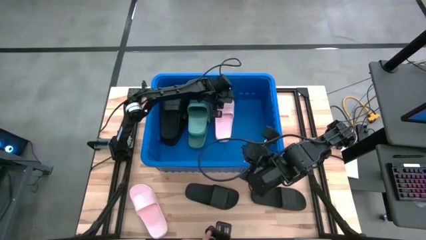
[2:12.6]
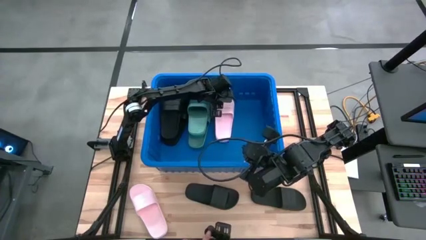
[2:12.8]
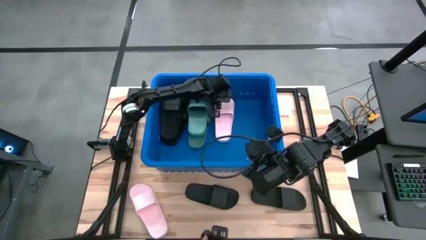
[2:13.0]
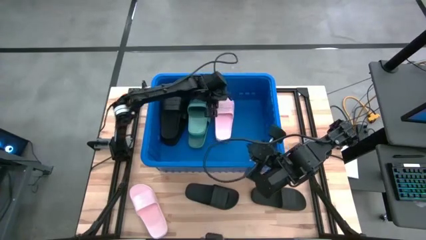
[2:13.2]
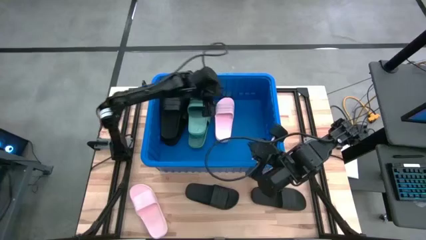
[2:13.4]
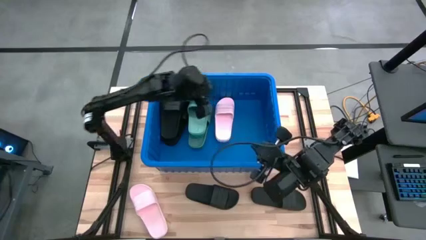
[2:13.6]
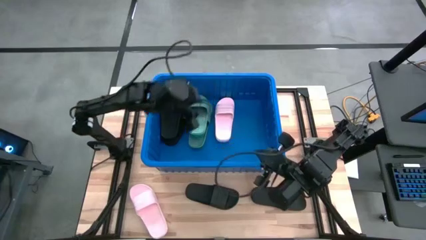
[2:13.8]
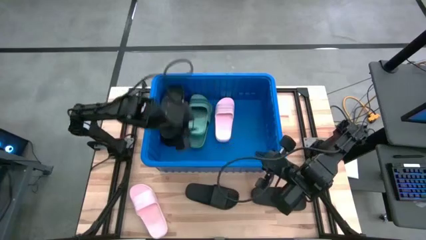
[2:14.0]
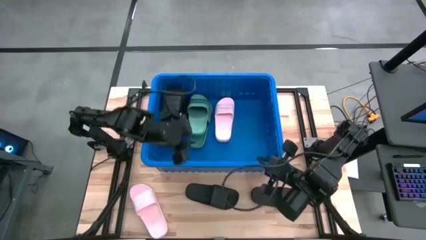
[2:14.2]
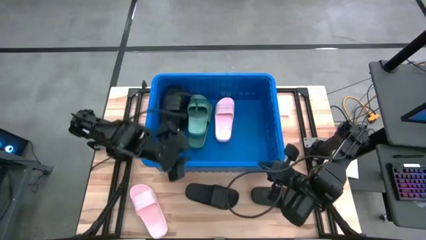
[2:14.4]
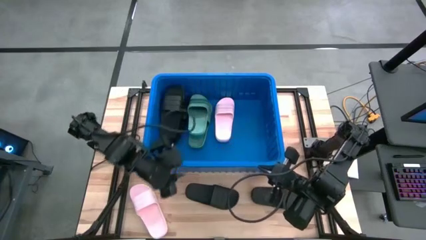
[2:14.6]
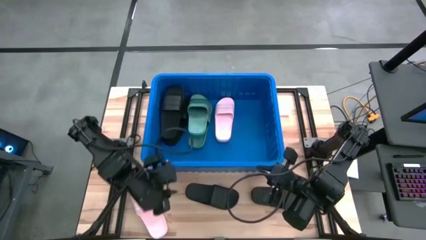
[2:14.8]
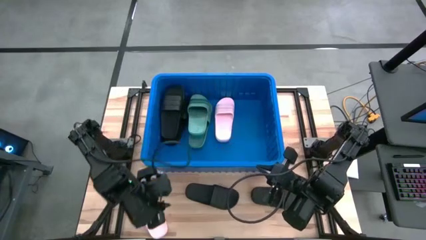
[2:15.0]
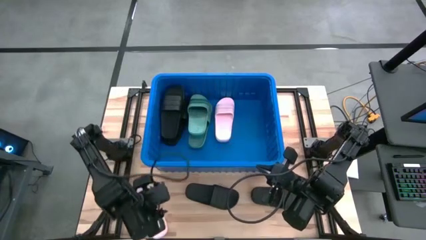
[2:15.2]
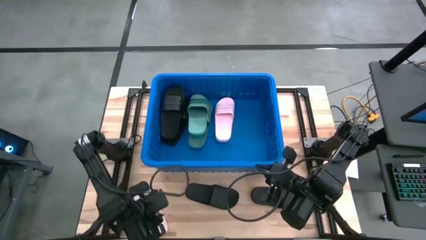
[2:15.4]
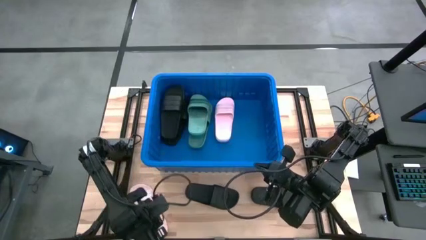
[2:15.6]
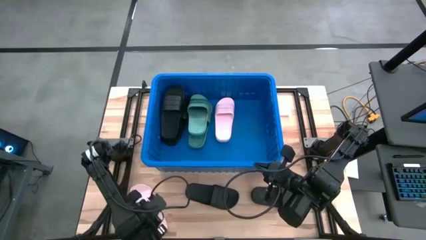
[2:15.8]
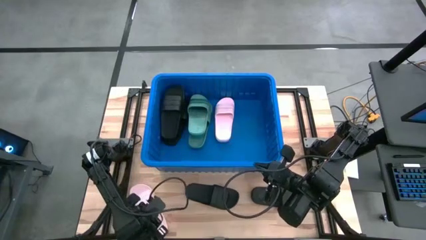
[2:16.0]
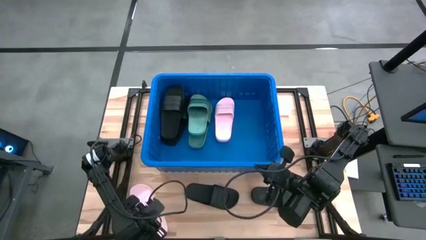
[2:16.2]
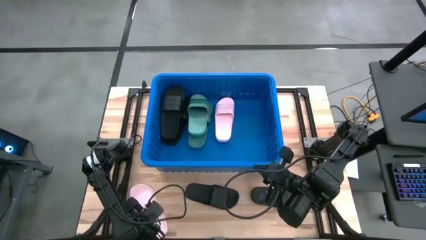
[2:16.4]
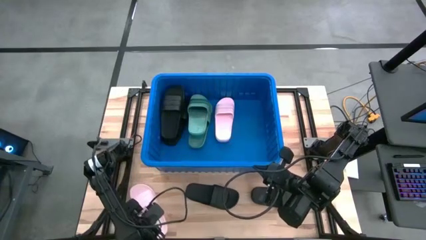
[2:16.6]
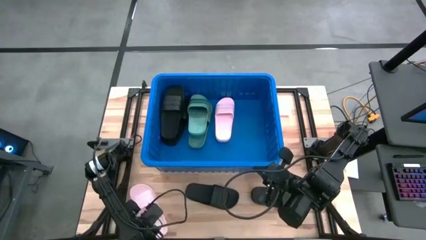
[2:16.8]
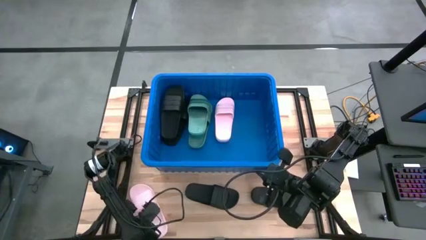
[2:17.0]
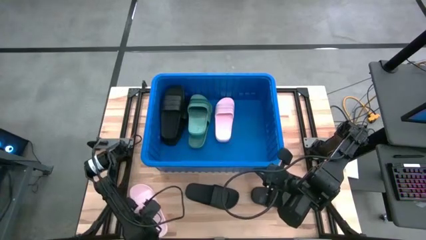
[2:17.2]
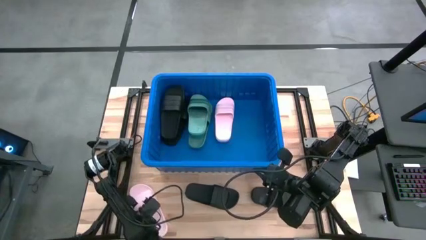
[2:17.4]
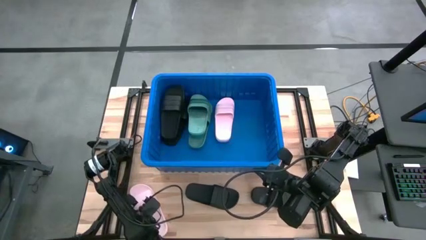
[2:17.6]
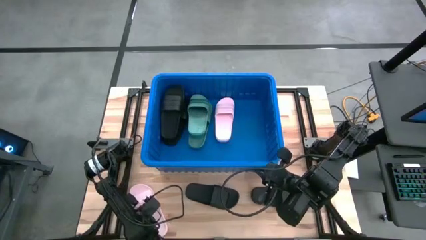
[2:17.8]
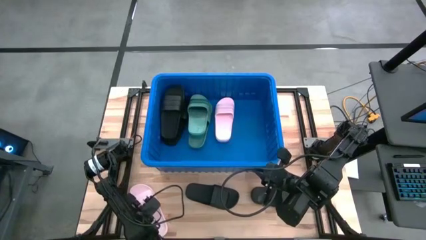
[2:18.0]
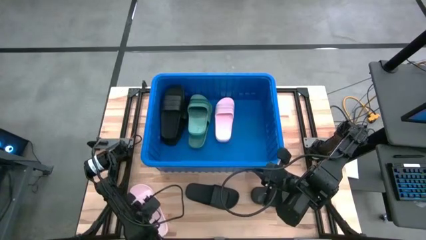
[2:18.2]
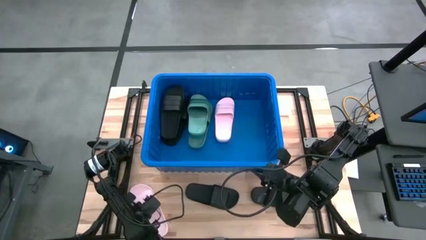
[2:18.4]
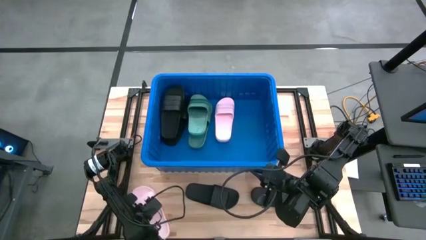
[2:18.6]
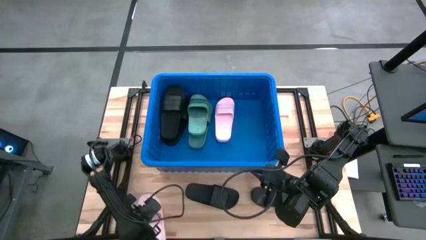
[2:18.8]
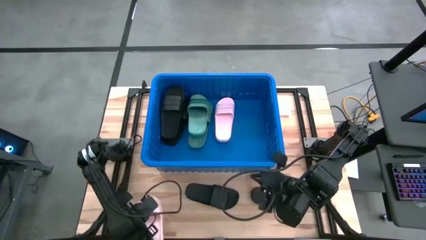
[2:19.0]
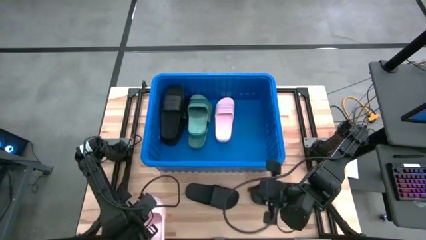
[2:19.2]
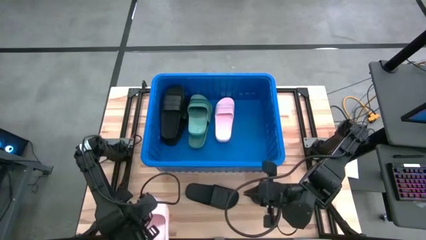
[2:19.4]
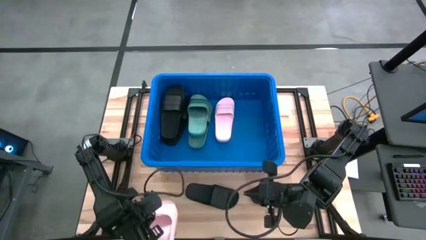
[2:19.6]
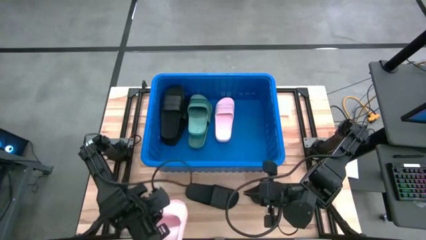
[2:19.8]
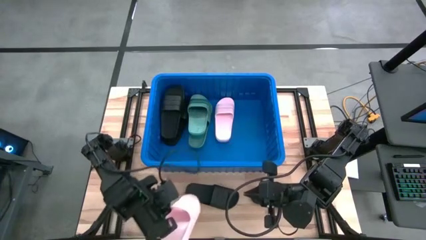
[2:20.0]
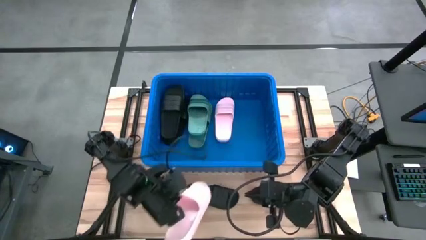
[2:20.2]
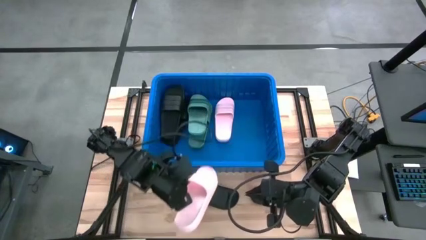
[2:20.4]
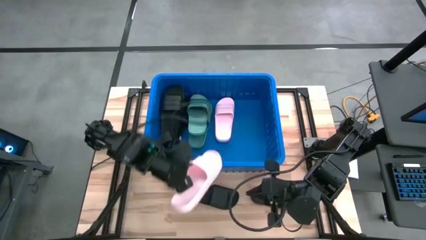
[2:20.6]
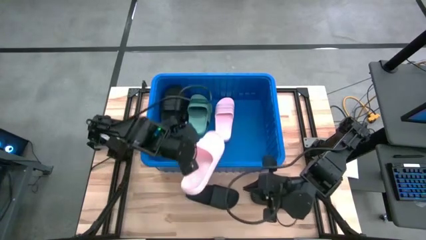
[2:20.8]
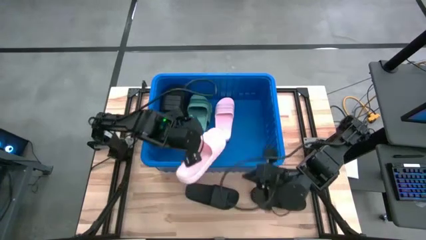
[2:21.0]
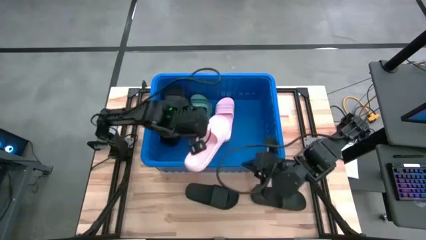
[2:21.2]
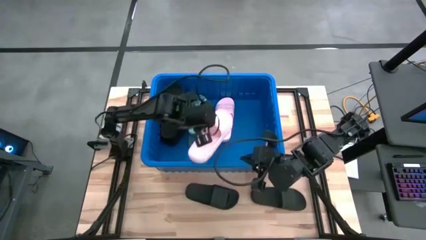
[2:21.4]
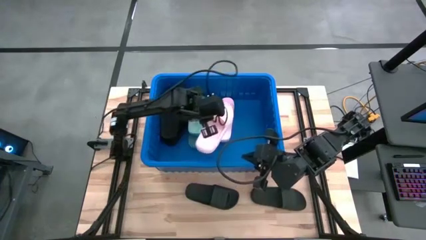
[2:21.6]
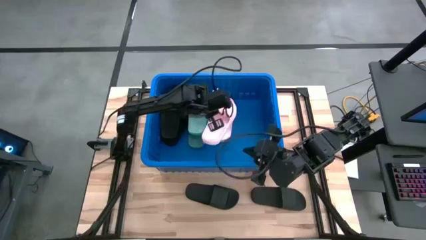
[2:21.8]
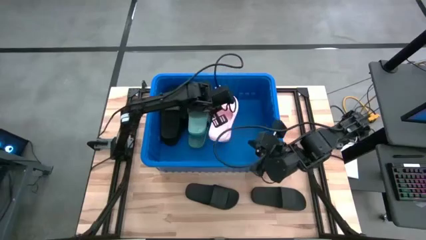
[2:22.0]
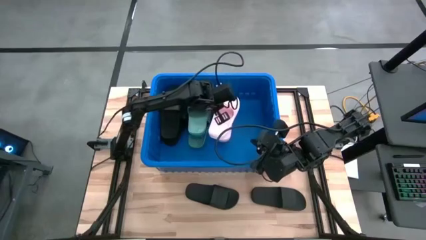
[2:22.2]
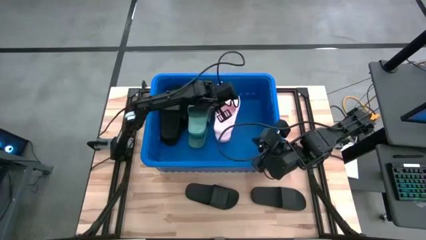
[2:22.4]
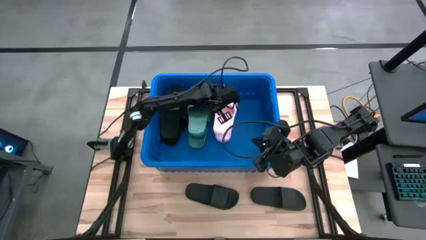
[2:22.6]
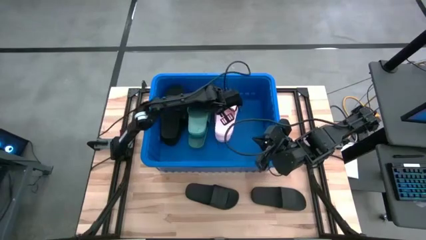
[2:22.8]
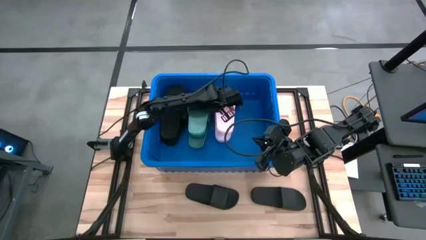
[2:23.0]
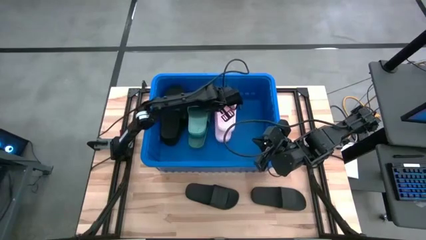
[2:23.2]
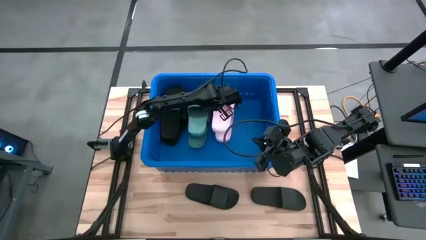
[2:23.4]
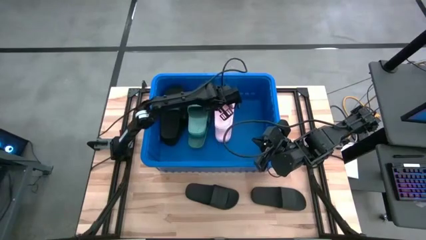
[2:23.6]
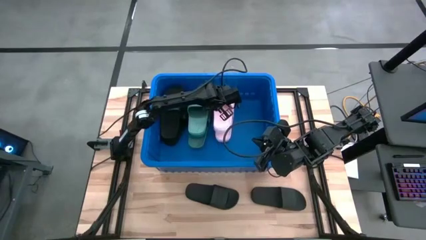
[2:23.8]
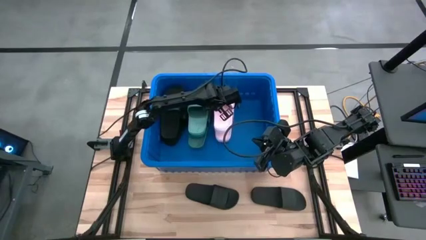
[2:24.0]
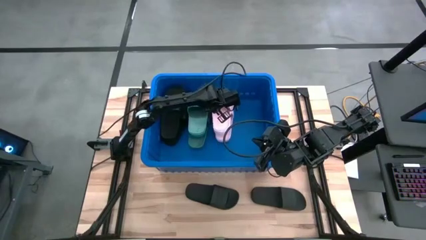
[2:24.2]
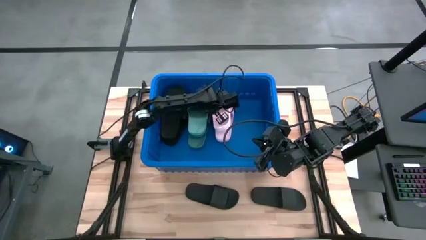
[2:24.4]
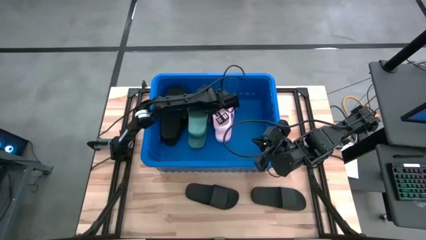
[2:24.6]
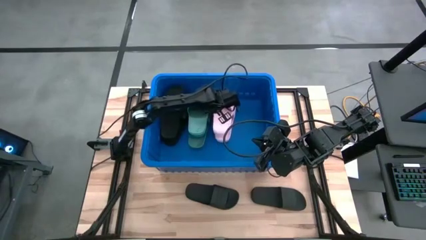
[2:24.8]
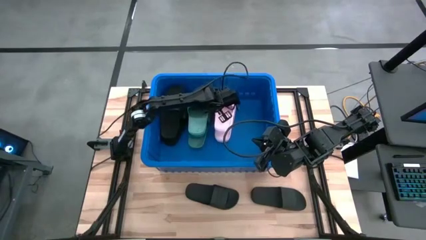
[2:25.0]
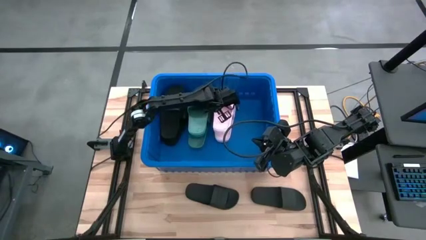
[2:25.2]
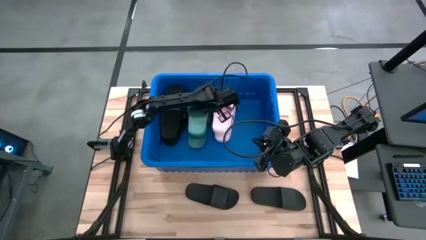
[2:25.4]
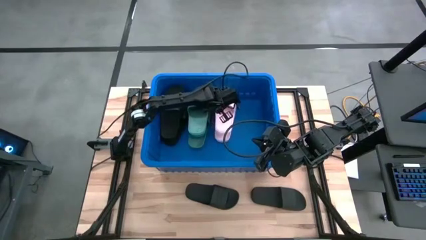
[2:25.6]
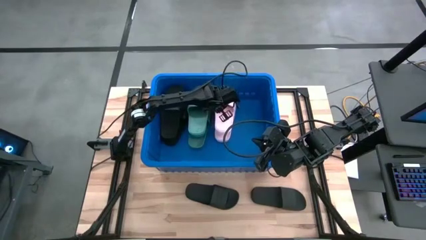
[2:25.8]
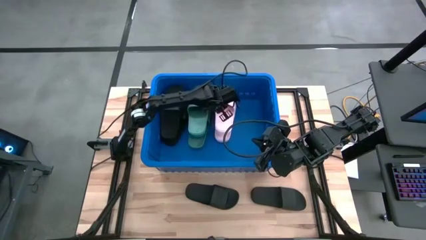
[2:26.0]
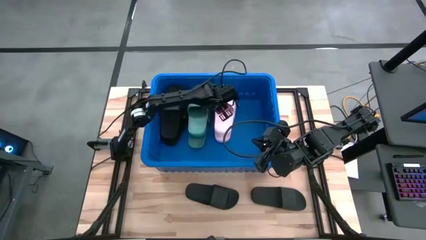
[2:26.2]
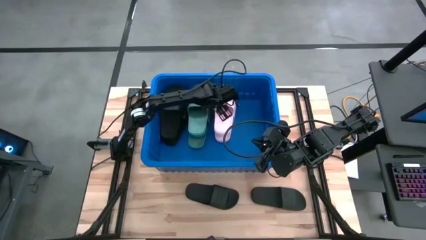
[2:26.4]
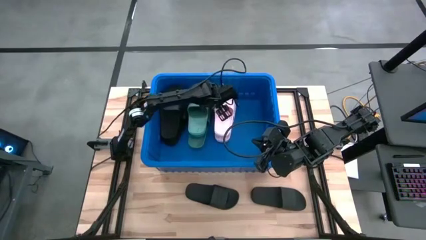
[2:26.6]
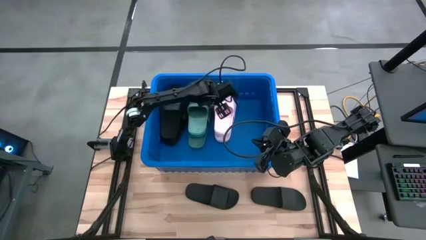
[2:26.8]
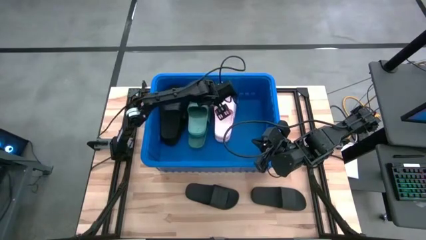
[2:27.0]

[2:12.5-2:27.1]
Task: Pick and place slides into bin
Put the pink slipper into the blue bin

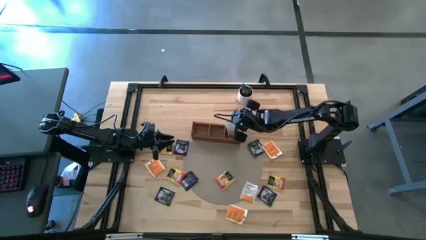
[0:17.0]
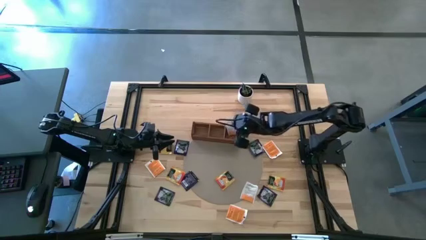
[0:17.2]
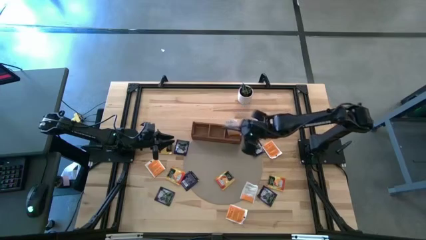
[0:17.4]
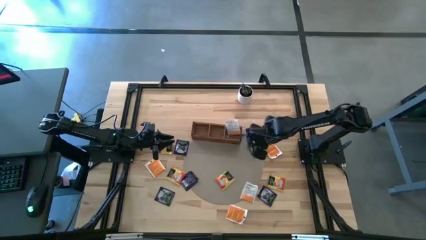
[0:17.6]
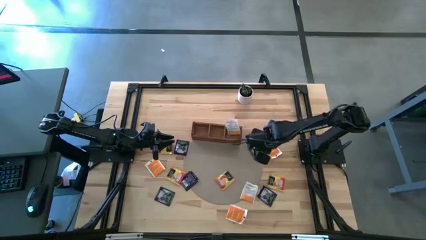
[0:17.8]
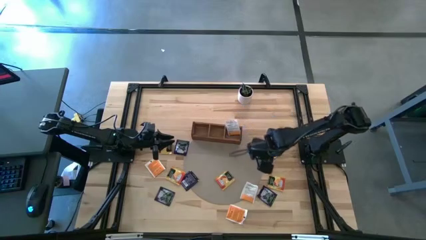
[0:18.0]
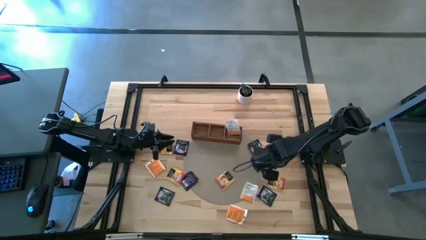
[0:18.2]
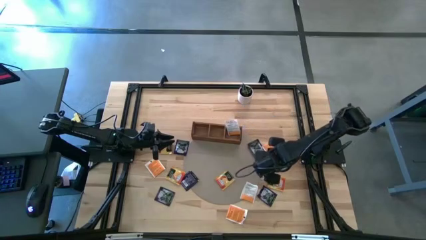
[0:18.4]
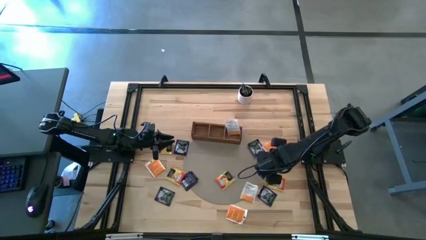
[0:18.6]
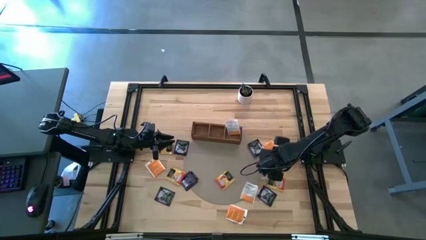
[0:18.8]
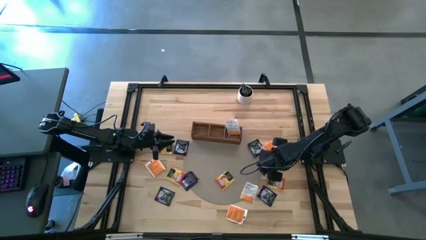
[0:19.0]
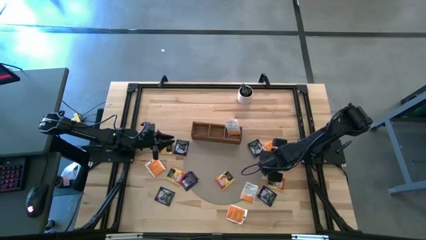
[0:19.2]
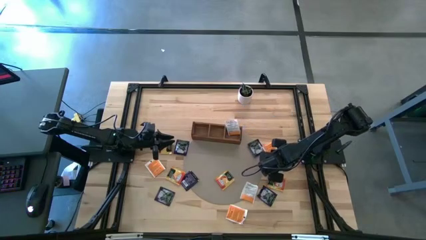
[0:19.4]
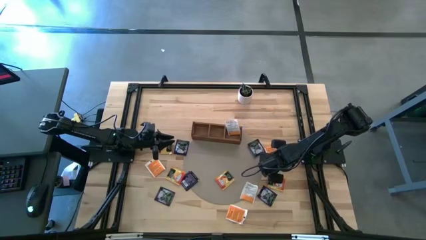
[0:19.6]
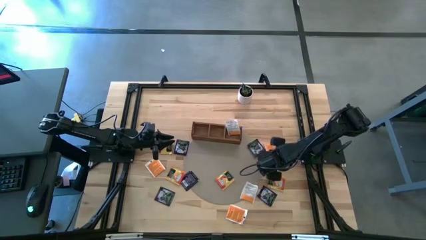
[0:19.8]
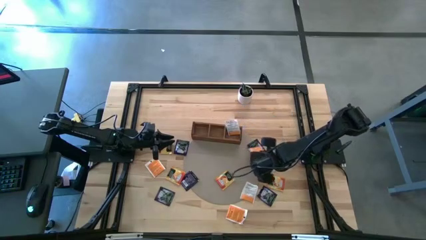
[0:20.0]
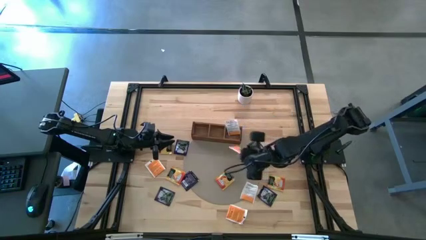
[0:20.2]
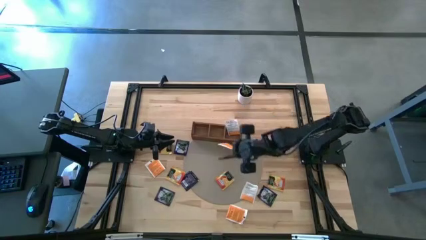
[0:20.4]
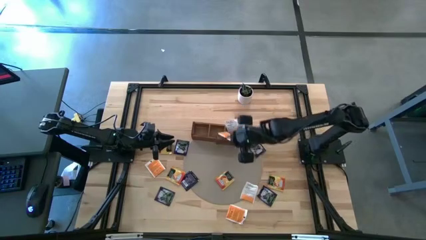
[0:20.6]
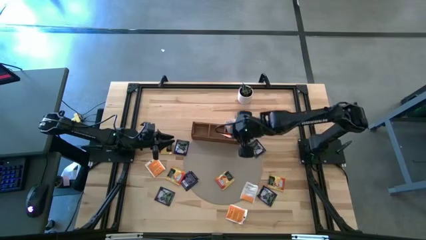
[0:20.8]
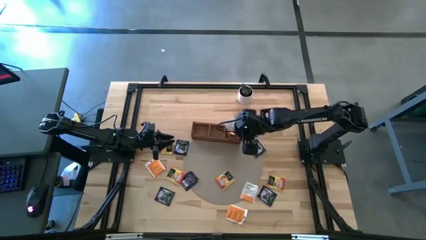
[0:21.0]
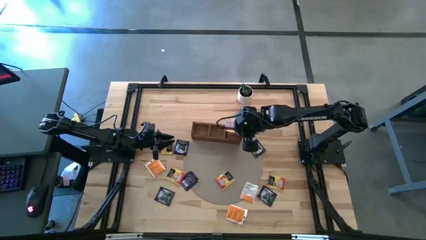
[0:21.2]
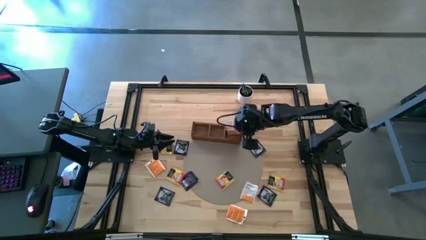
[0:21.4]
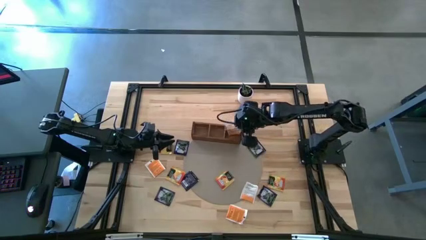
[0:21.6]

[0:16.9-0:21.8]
Task: Pick & Place Tea
Put the white tea bag into the right section of the wooden organizer
